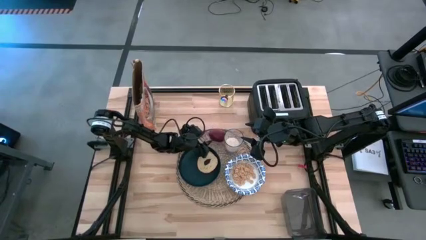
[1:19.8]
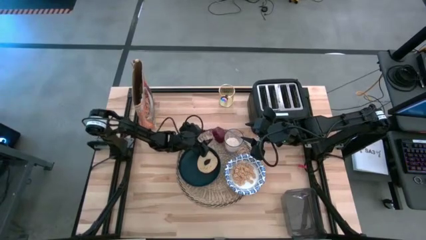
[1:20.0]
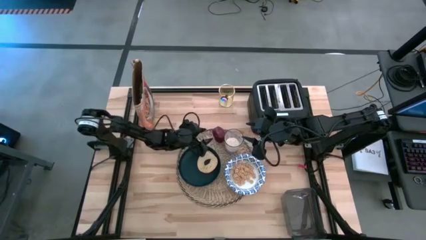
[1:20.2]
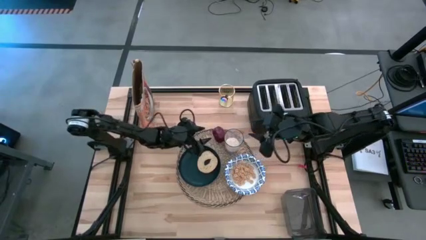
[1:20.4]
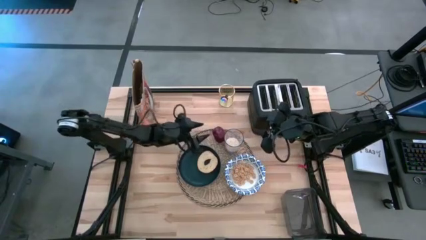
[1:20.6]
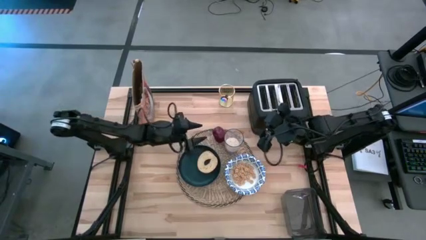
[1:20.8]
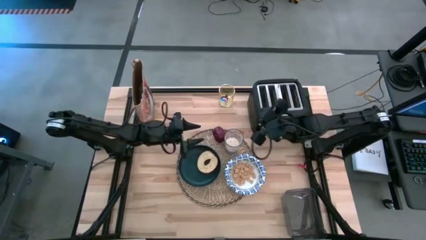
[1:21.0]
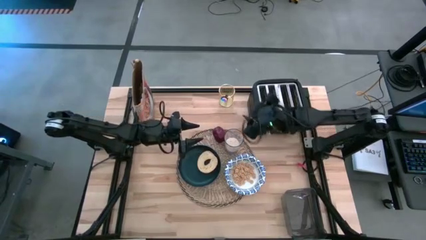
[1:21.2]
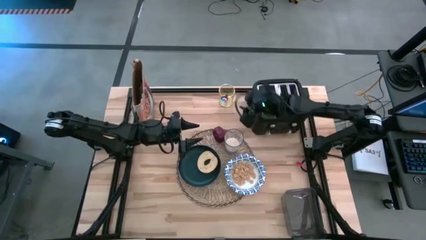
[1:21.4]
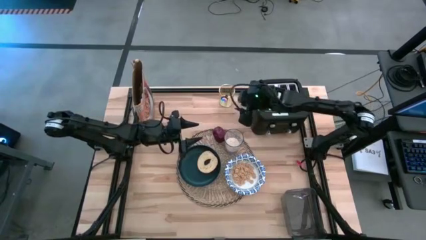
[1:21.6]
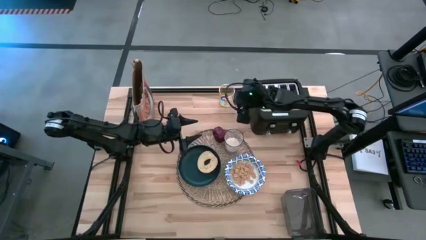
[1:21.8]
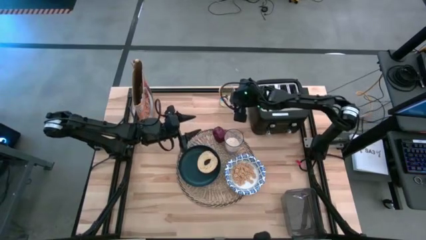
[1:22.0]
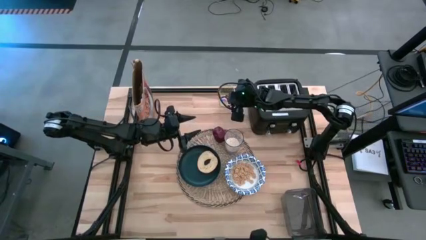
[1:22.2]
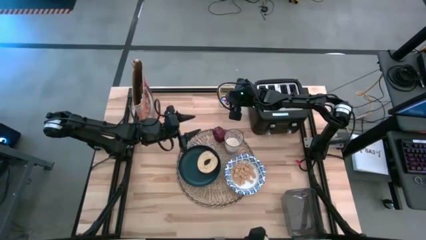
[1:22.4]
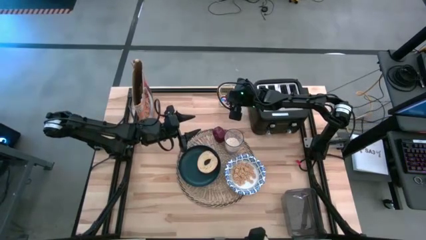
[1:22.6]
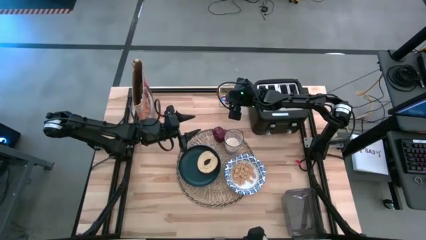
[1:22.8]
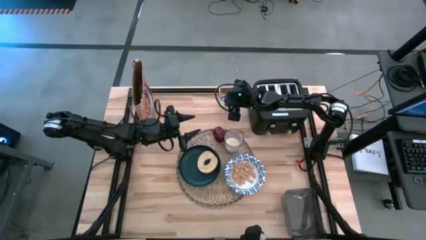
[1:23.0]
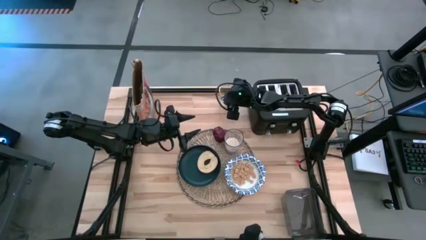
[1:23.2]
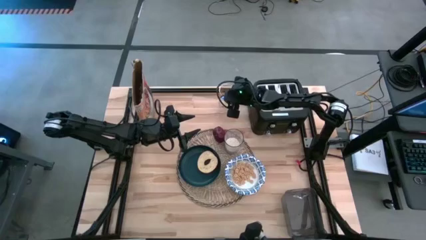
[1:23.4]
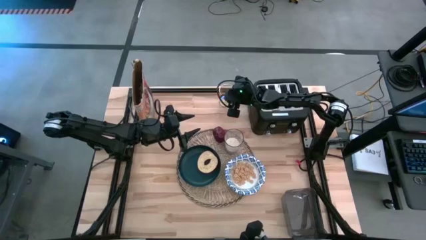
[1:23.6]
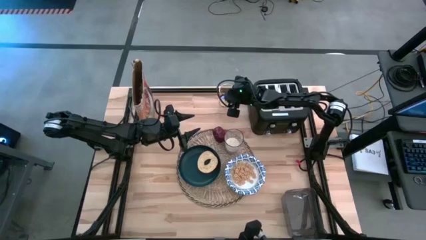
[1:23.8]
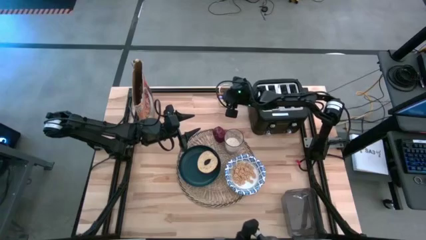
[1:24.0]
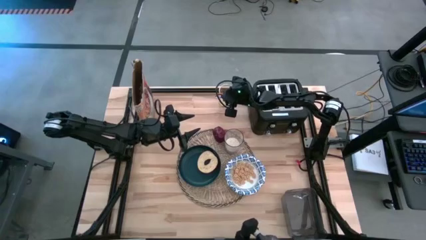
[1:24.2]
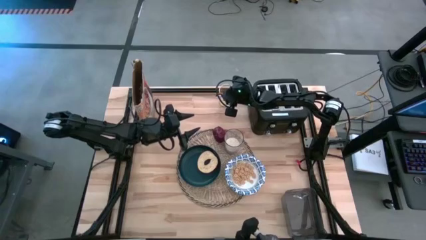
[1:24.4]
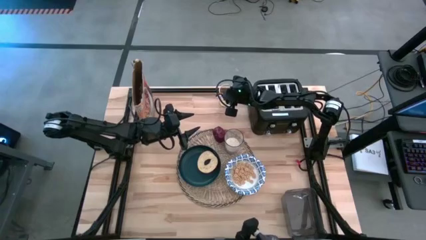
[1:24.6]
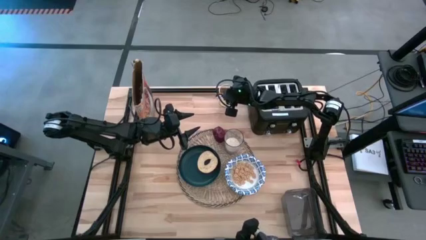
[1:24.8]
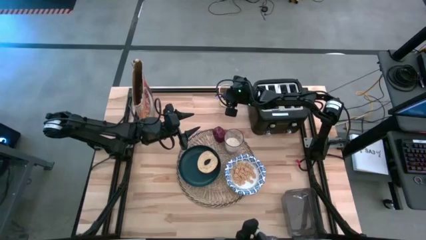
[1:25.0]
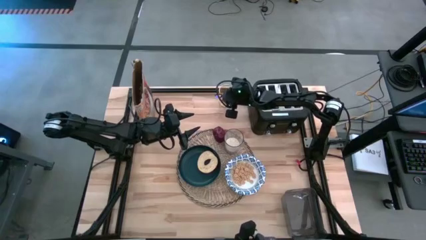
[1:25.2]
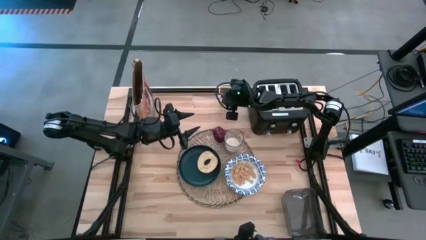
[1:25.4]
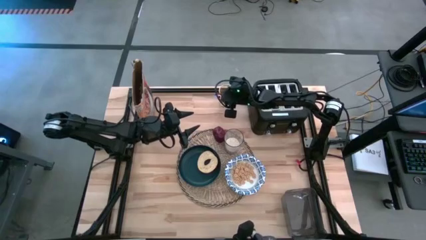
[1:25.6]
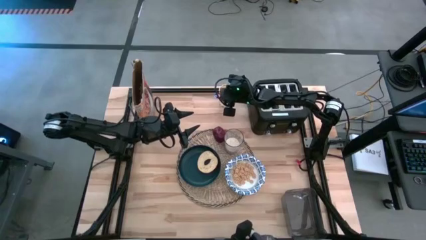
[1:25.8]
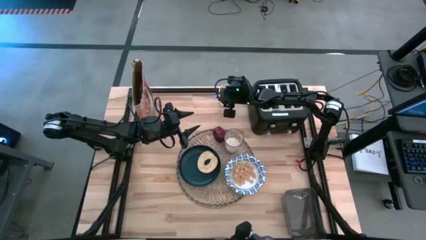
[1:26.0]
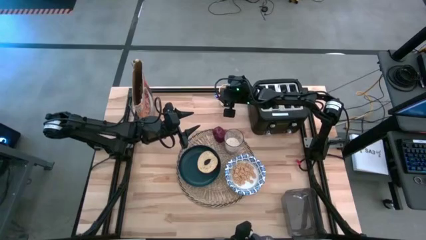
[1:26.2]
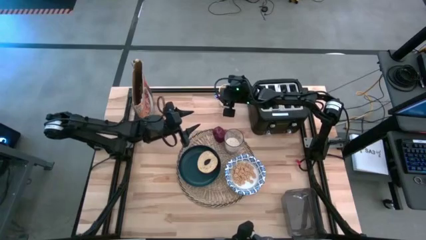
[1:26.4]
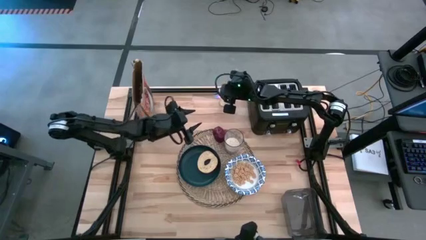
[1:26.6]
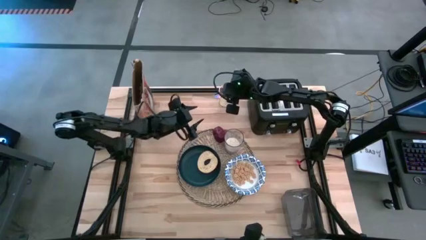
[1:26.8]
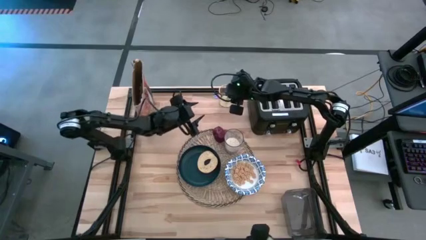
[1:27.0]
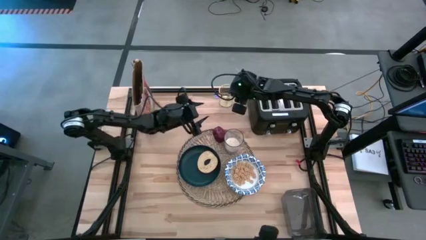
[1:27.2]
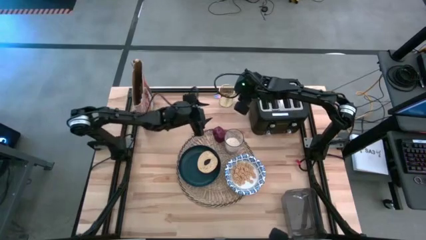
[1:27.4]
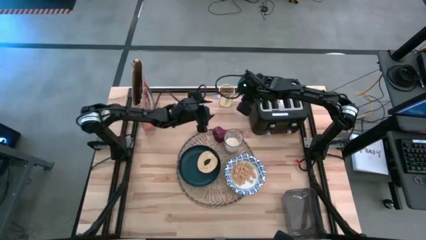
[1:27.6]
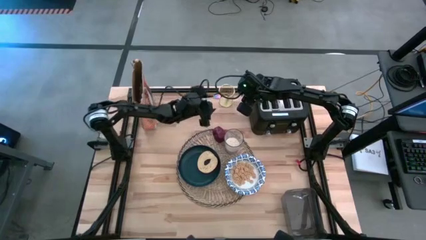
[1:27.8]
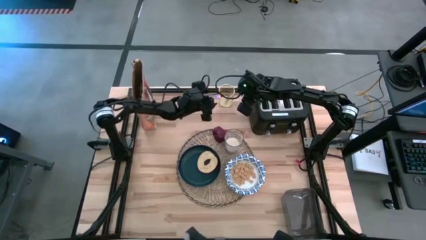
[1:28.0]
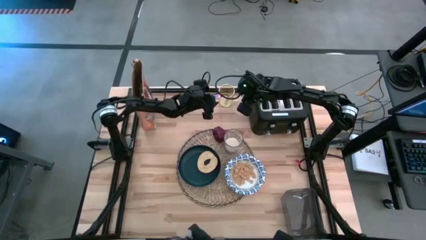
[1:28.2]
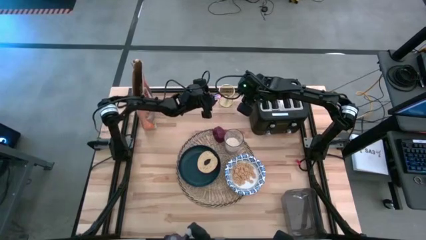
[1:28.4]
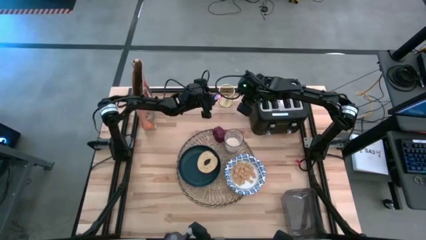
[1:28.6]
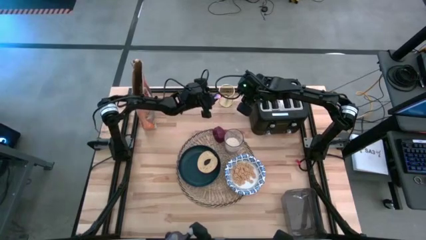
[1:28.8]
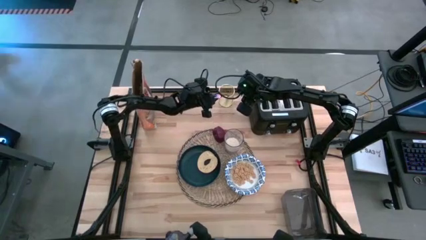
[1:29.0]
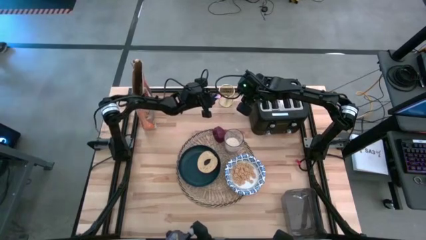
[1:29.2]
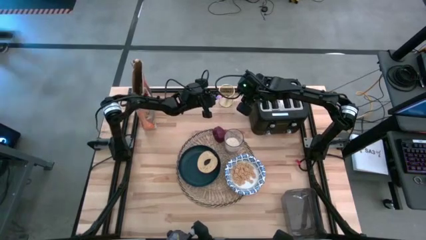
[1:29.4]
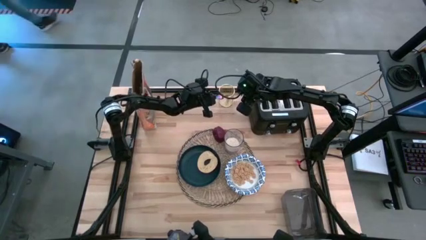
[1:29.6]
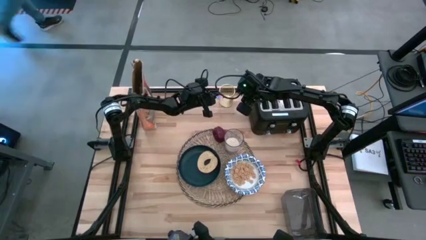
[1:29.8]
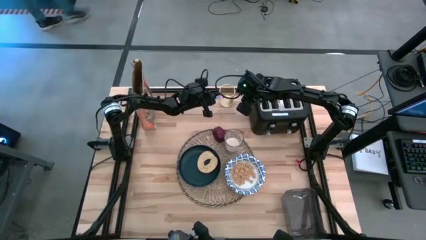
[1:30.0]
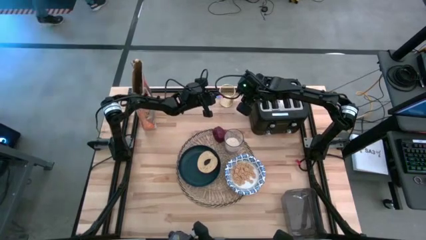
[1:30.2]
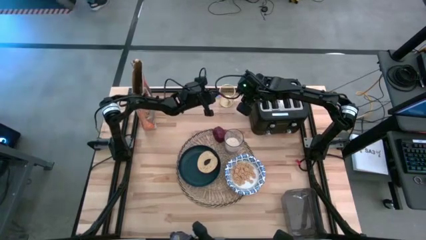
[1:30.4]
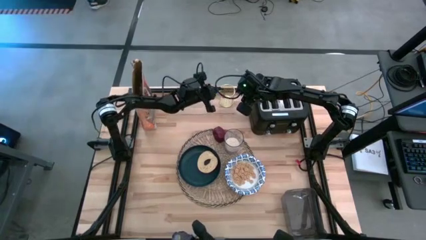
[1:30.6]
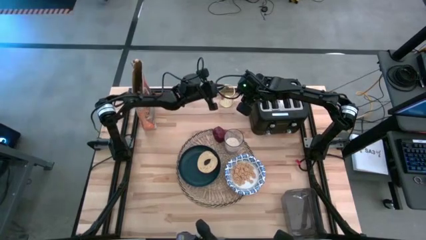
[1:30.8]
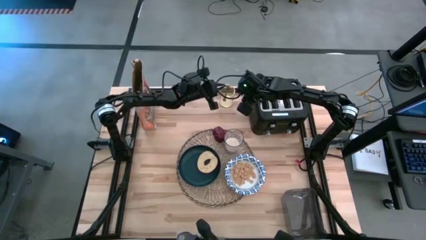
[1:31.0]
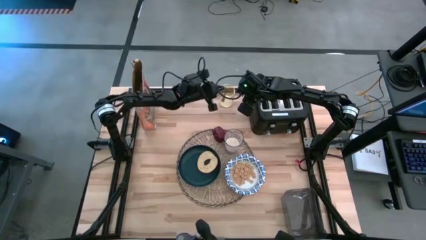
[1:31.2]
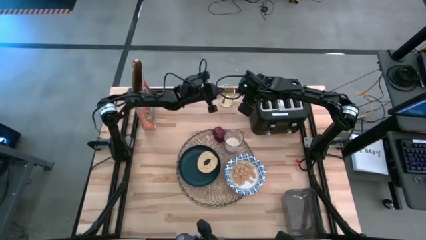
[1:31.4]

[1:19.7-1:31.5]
Task: Arrange a breakfast setting
Put the blue spoon beside the placemat
